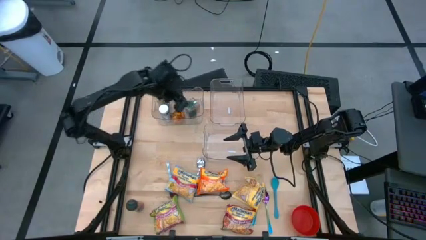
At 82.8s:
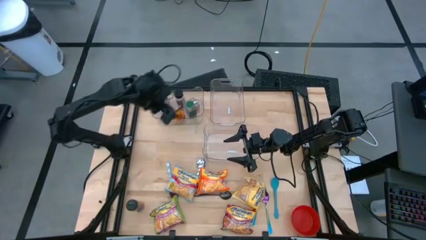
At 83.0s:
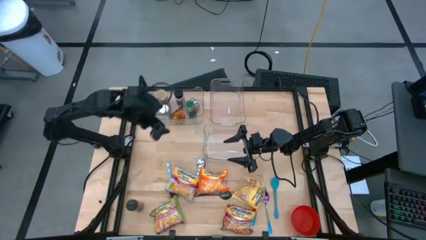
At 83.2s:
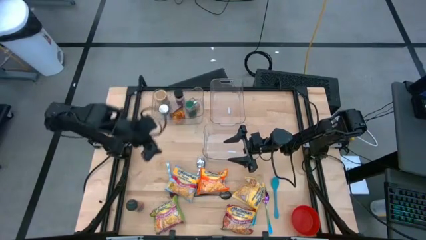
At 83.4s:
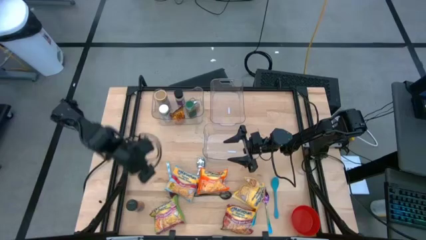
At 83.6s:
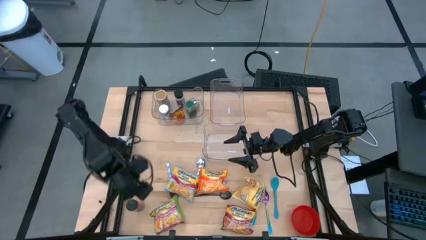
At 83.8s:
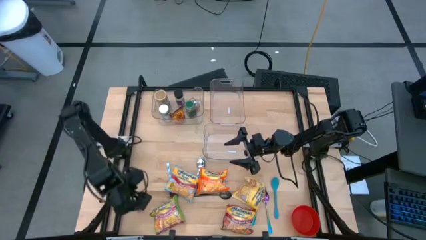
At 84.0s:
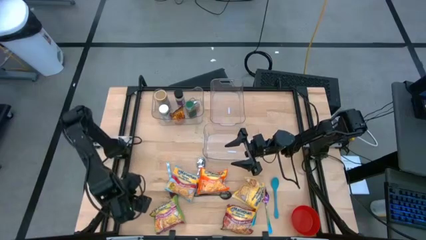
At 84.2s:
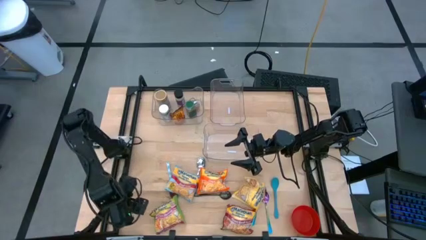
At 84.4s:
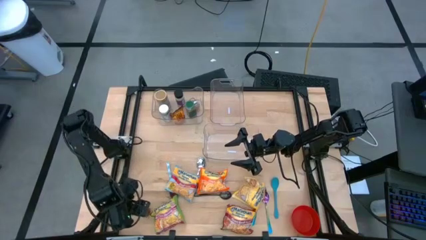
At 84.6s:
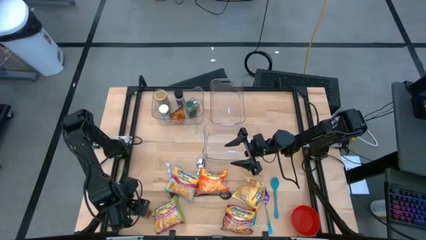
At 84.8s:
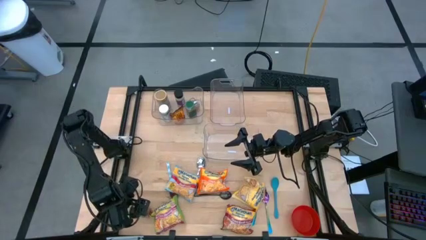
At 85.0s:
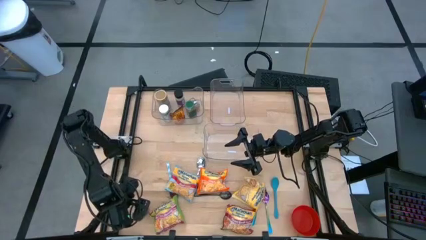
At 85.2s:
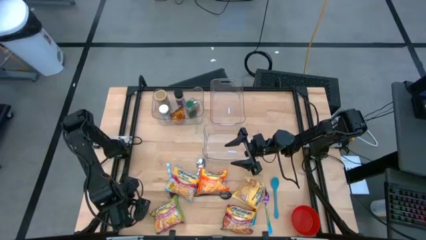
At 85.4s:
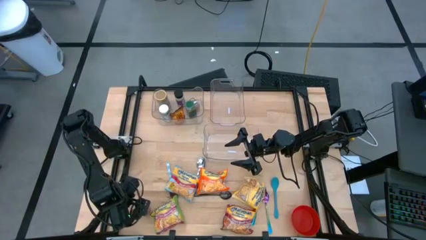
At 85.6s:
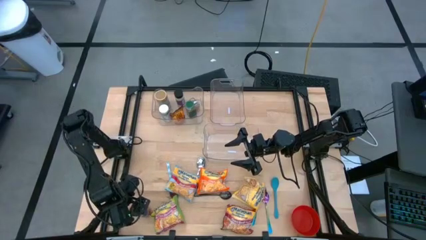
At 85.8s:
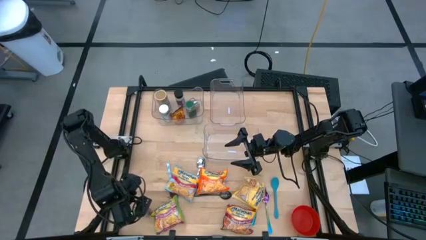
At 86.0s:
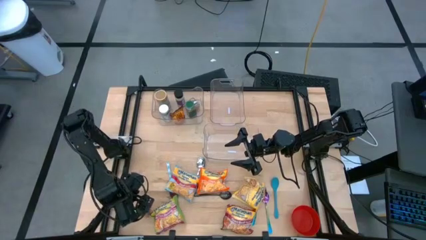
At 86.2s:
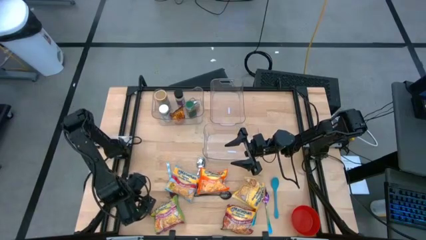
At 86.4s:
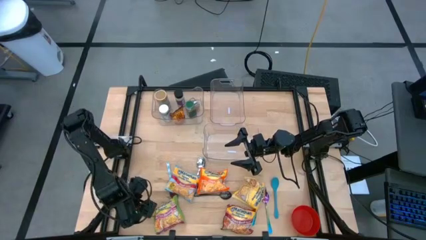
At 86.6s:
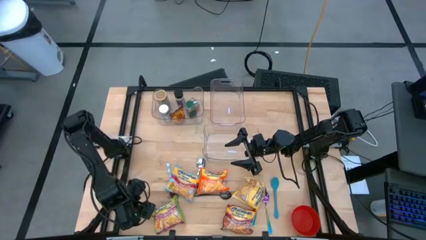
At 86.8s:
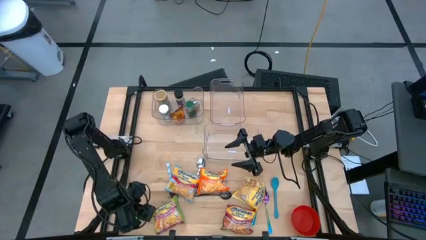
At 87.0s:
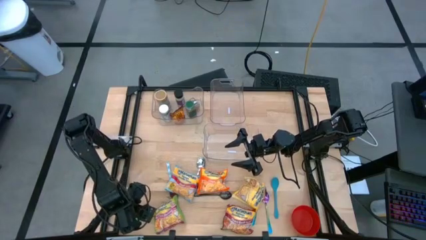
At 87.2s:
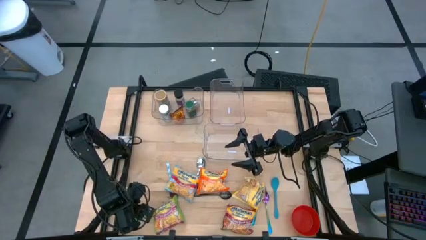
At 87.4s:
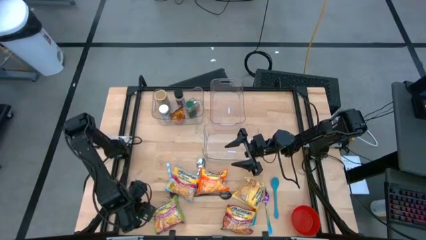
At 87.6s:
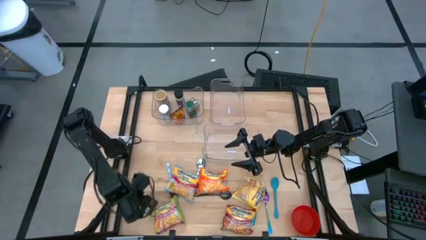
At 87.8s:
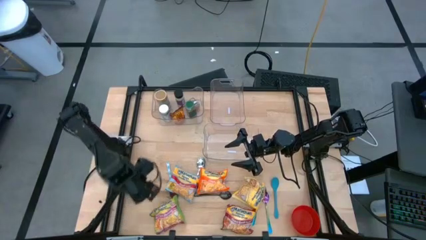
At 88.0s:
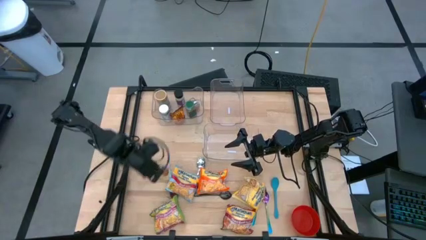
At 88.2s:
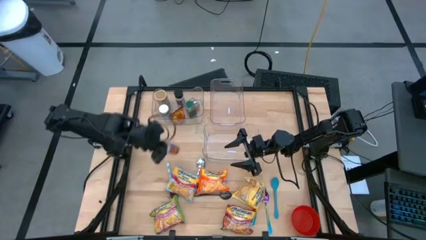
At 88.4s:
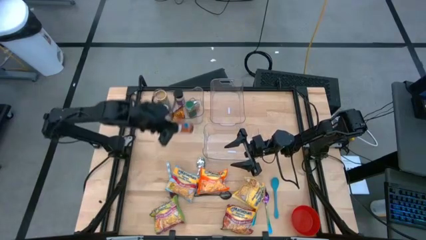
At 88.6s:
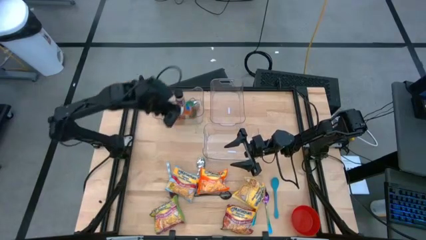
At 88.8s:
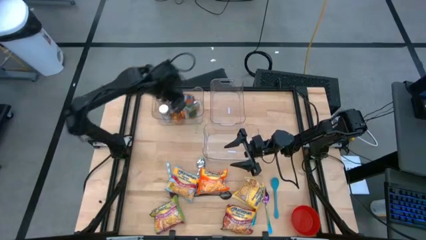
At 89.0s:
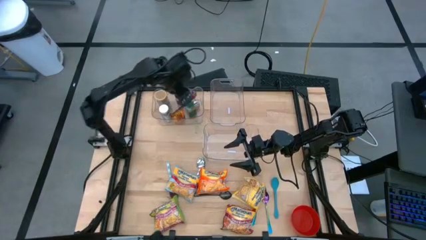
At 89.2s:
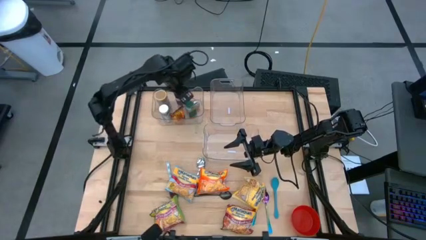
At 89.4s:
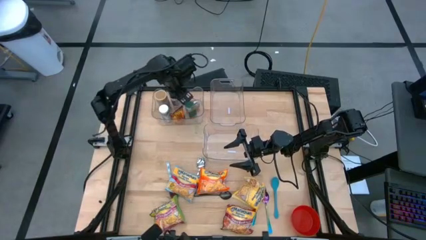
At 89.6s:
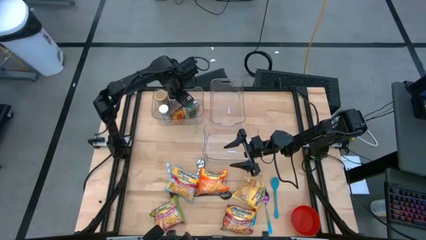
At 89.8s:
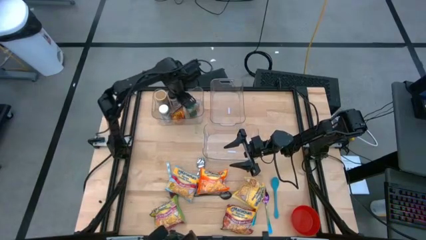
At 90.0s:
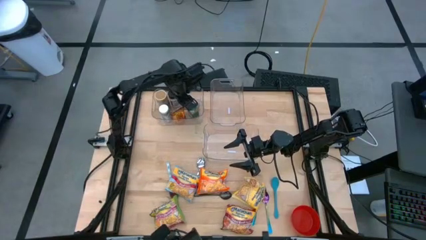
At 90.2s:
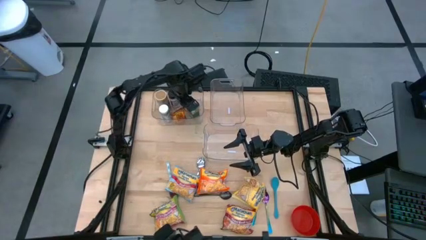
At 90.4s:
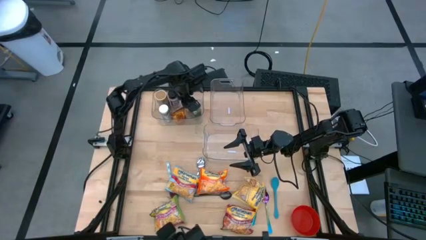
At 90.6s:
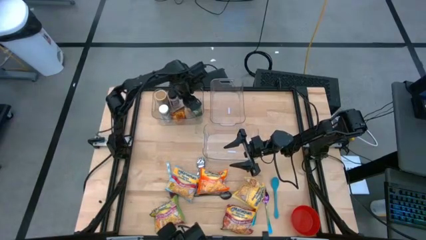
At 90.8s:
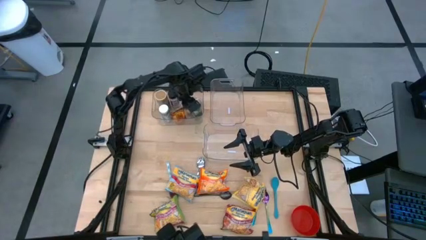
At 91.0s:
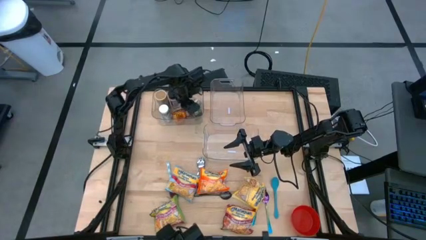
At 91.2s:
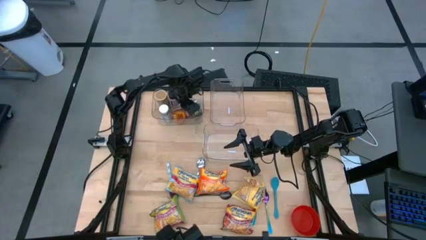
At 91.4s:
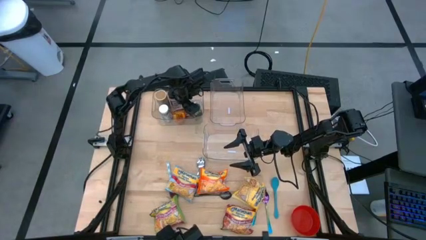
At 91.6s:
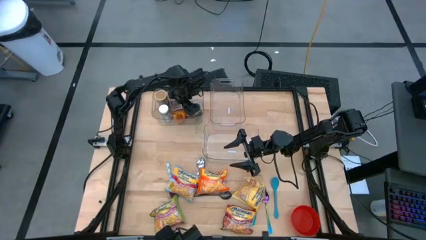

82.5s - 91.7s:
Task: Pick & Place Food Item
Put the orange seasoning bottle into the top left transparent container

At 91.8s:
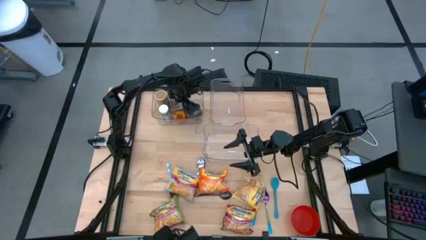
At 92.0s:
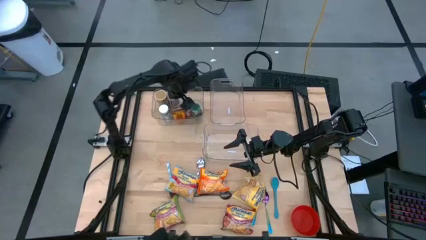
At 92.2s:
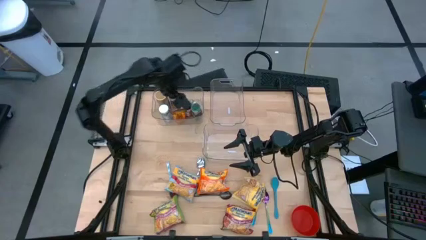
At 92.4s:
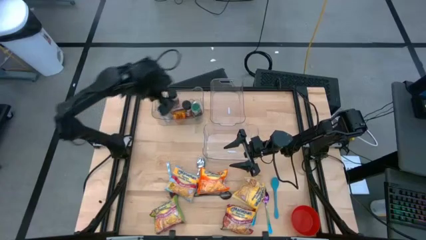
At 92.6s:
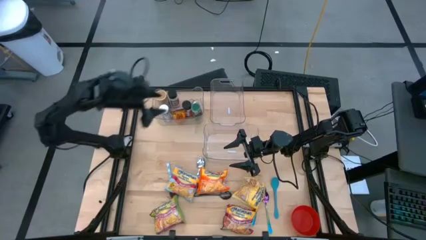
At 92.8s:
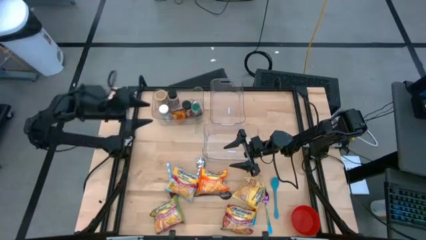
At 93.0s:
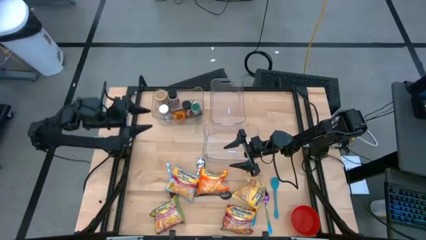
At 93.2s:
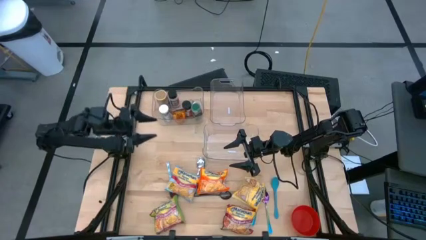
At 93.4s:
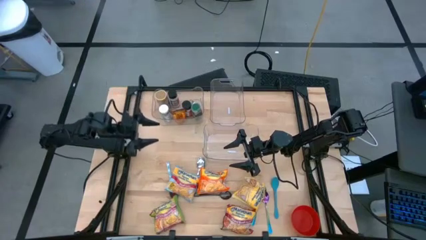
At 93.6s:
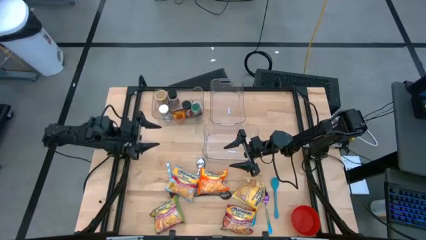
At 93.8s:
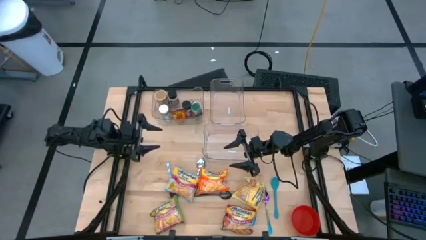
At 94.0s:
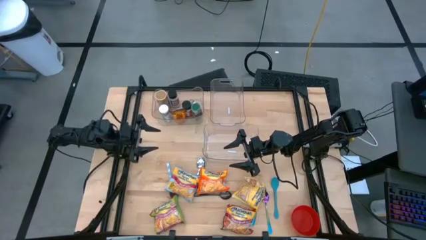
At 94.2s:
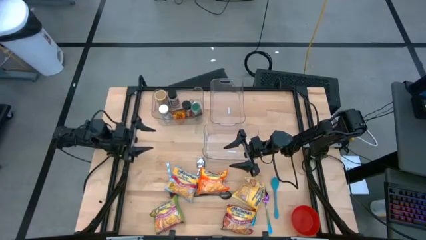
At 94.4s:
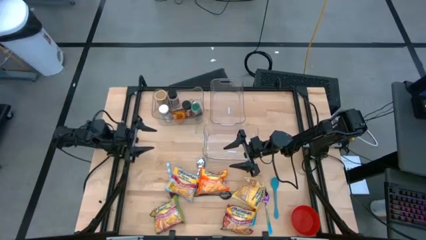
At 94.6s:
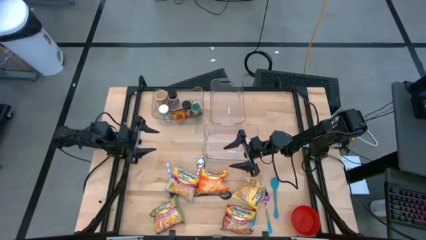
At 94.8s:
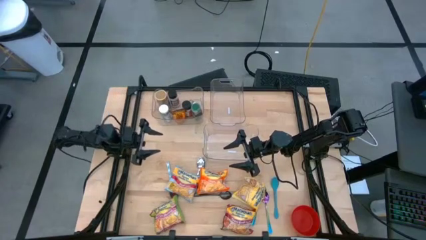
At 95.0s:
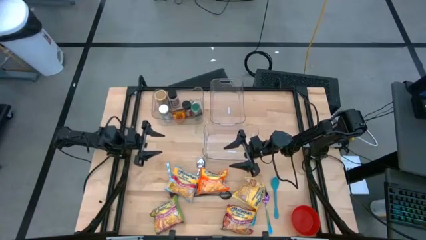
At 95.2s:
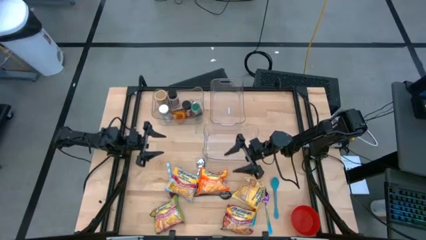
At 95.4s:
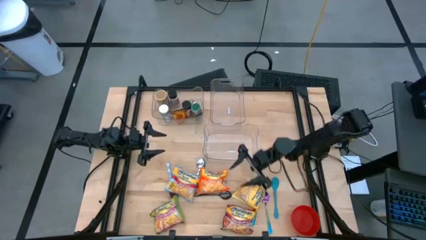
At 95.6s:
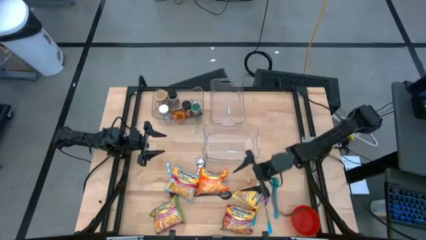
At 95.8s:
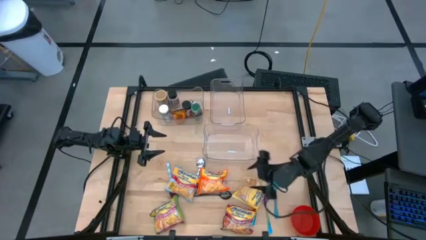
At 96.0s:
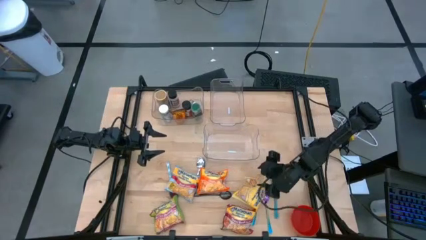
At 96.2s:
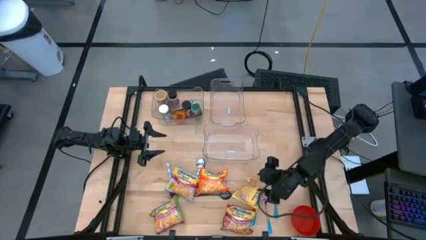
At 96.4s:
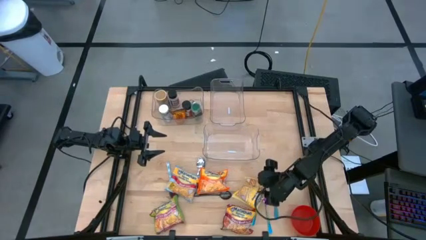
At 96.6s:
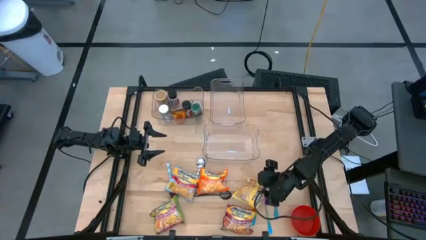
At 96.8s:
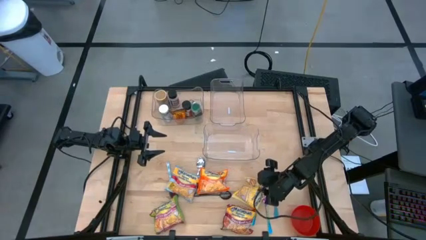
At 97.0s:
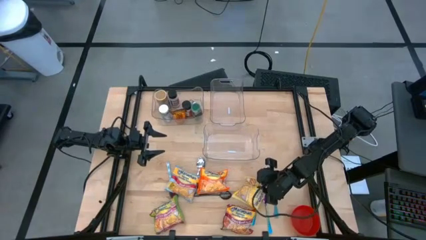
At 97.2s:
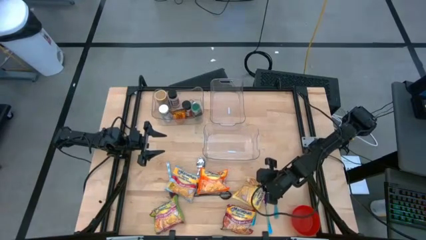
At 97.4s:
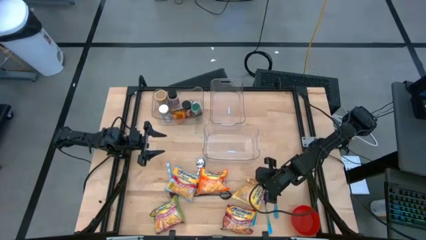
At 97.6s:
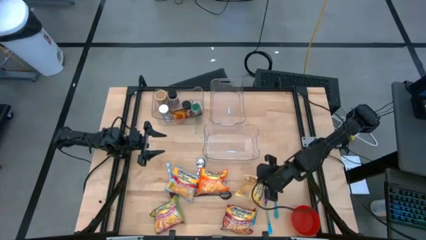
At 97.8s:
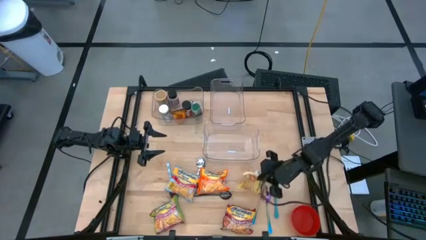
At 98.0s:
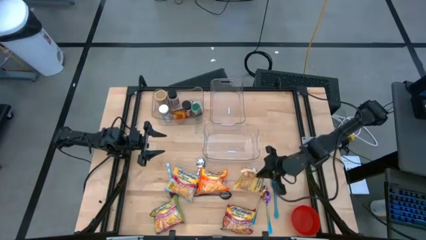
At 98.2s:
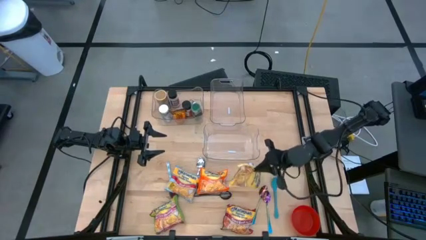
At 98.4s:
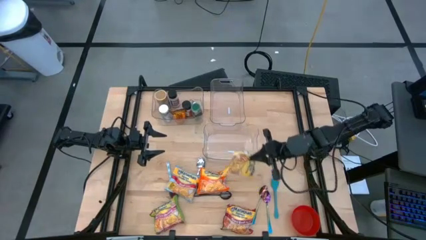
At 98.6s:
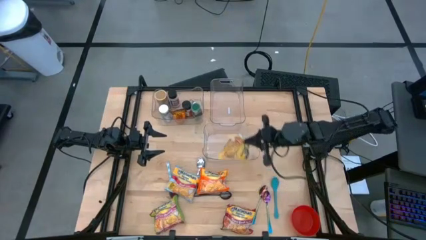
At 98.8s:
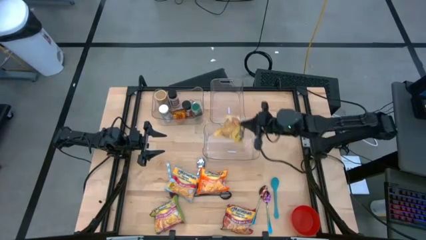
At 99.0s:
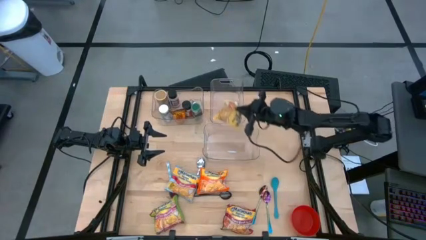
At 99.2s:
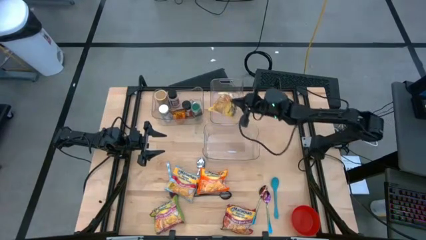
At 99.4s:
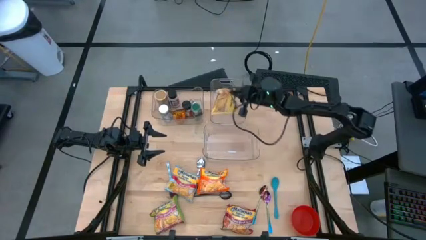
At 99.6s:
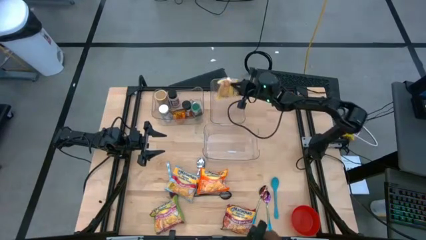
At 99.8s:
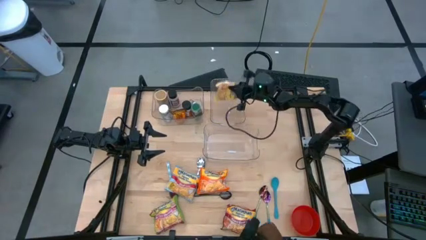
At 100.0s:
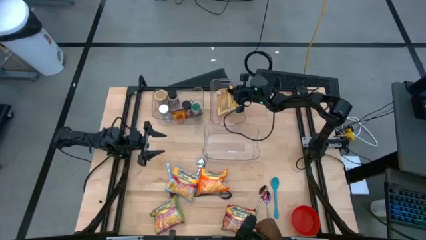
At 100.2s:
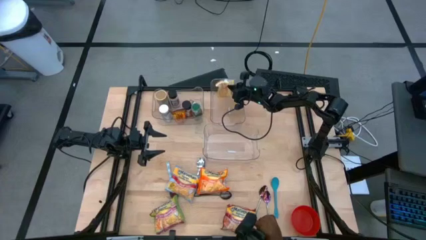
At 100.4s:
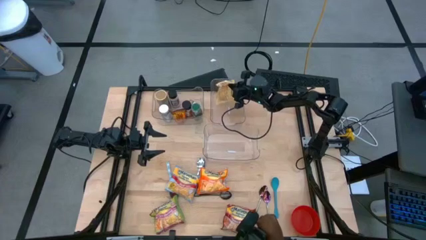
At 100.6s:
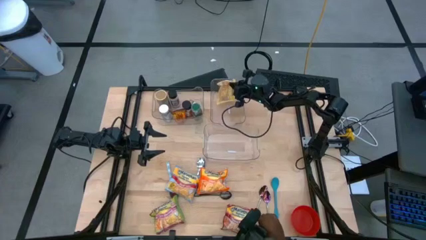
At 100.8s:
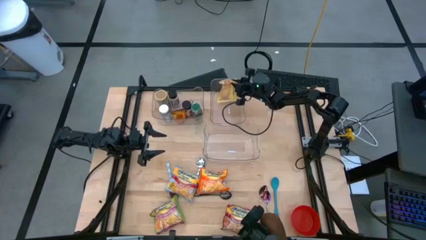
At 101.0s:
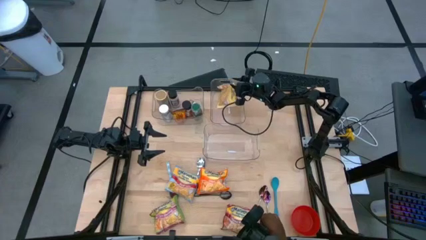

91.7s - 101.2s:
Put the yellow noodle pack into the top right transparent container
